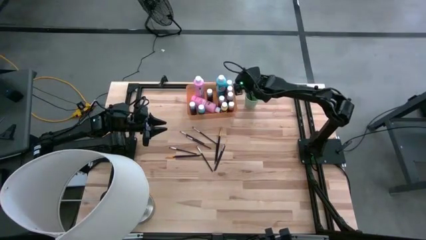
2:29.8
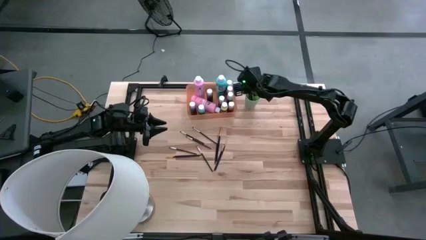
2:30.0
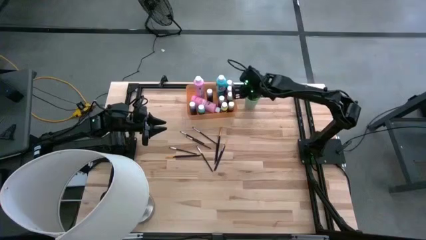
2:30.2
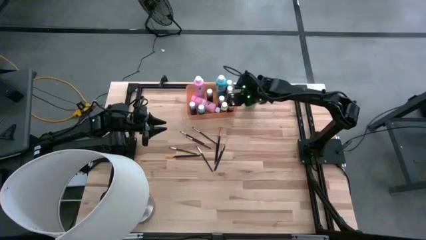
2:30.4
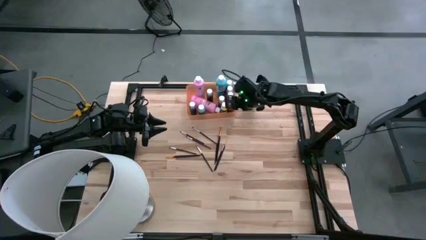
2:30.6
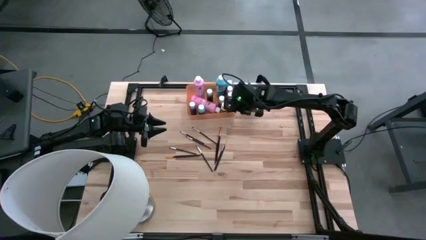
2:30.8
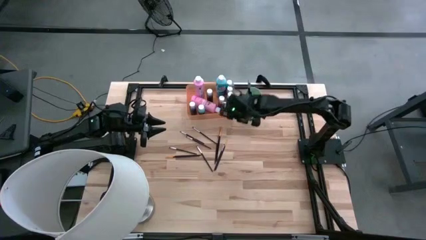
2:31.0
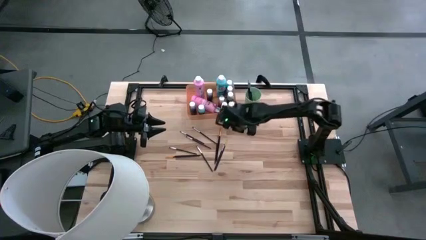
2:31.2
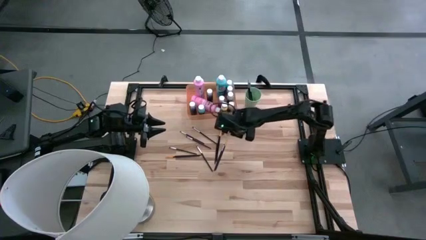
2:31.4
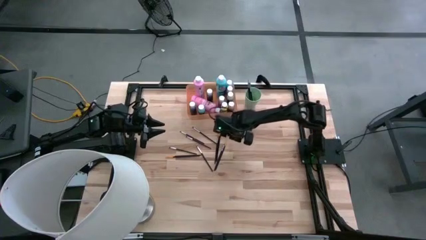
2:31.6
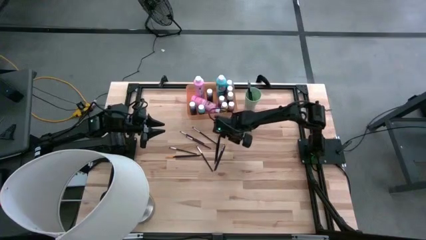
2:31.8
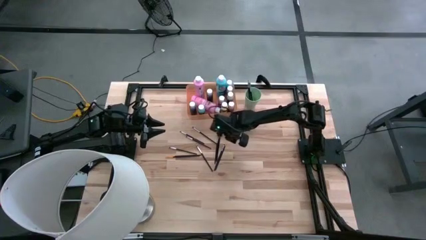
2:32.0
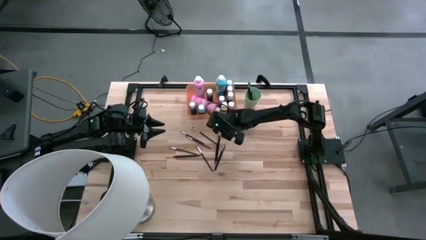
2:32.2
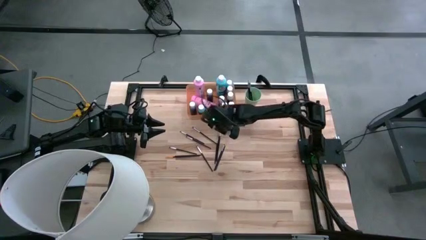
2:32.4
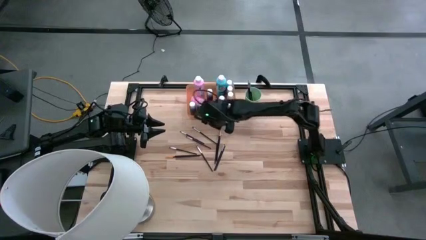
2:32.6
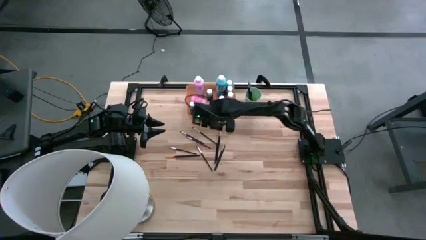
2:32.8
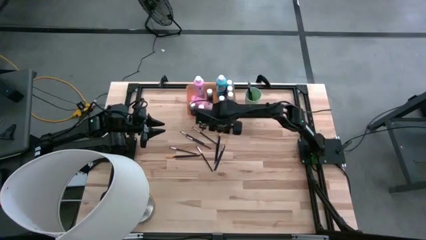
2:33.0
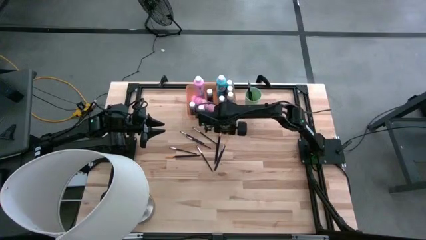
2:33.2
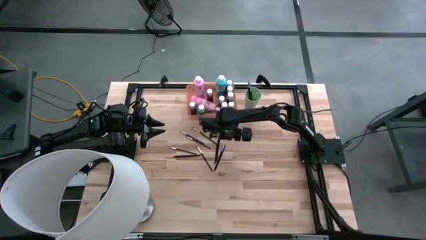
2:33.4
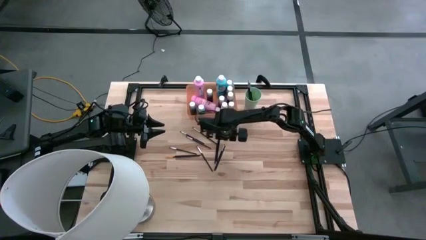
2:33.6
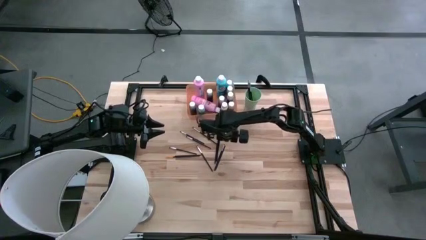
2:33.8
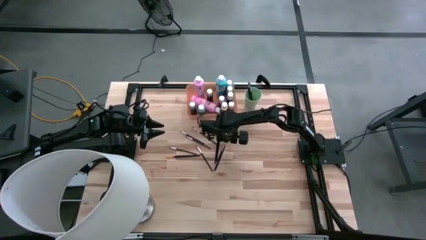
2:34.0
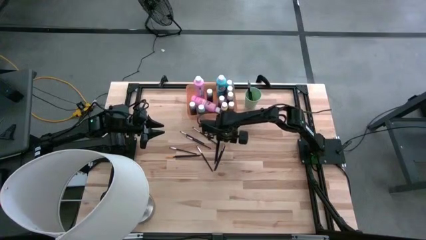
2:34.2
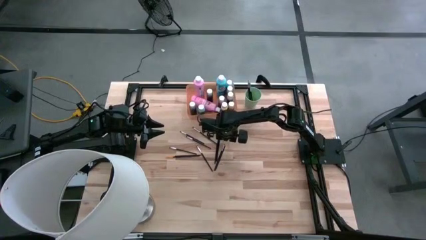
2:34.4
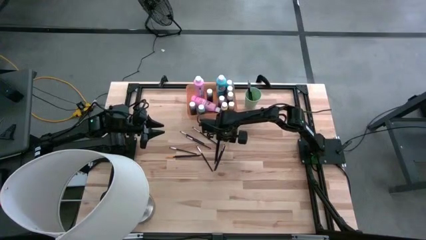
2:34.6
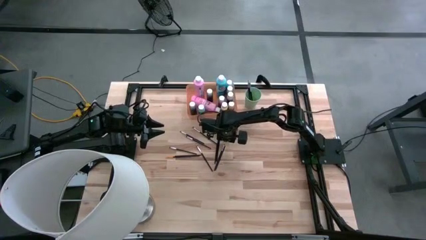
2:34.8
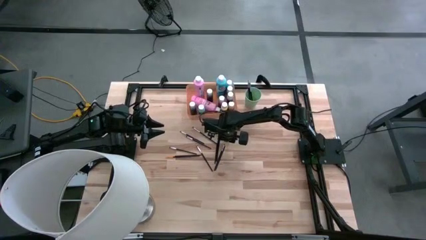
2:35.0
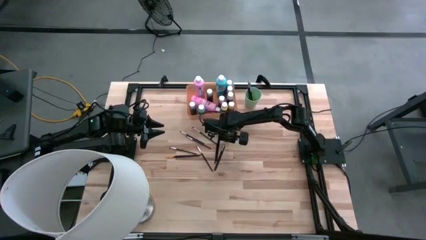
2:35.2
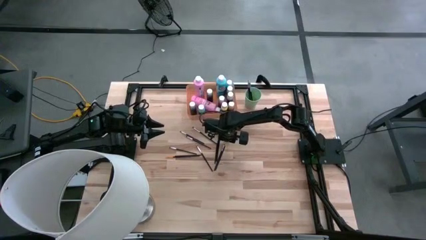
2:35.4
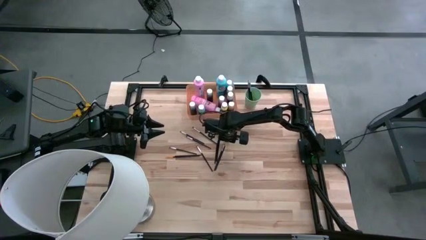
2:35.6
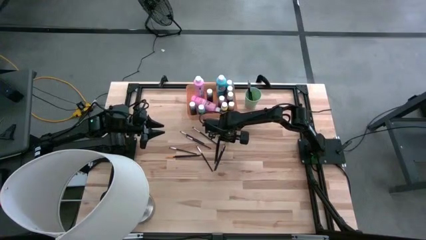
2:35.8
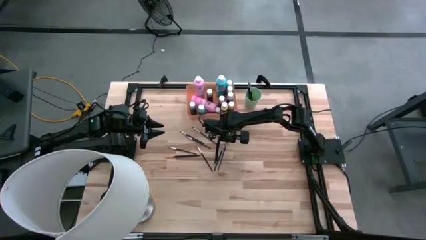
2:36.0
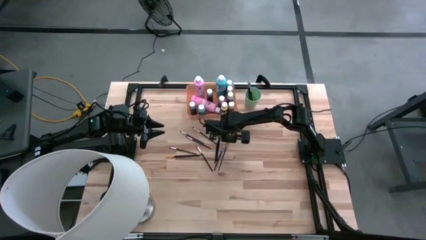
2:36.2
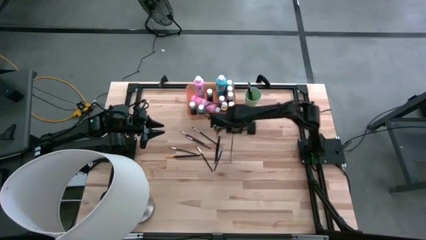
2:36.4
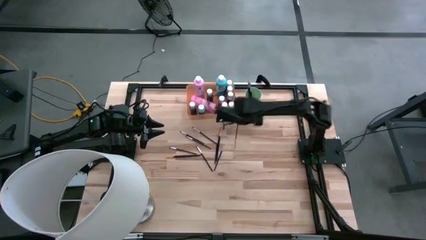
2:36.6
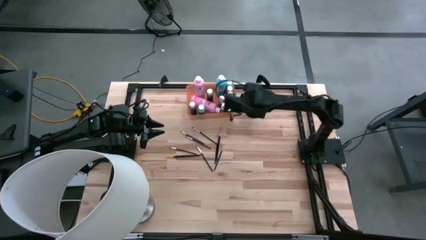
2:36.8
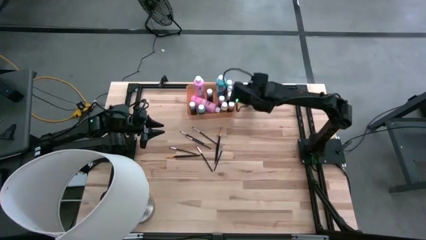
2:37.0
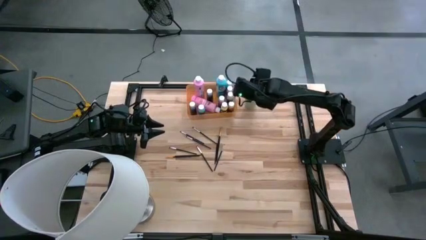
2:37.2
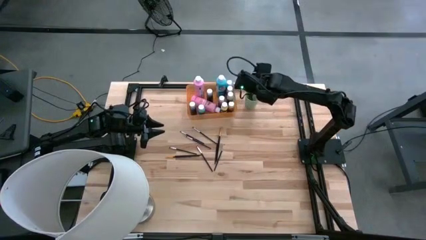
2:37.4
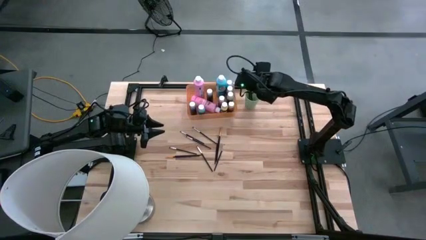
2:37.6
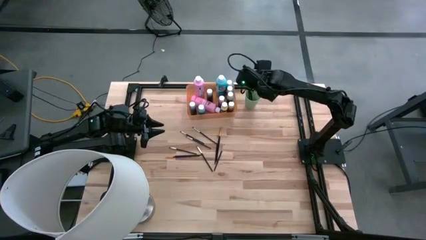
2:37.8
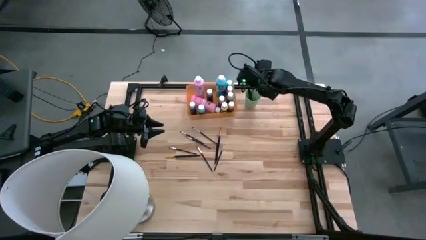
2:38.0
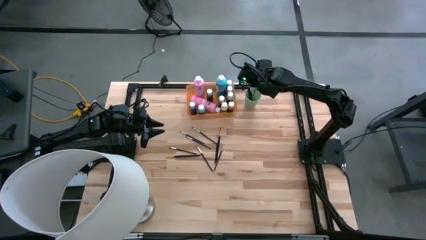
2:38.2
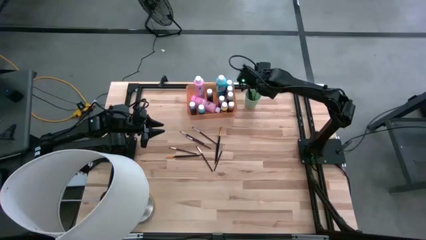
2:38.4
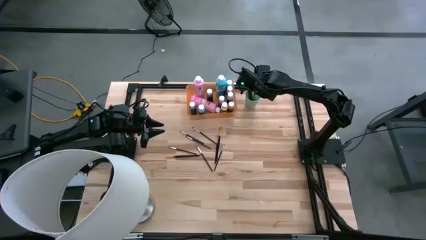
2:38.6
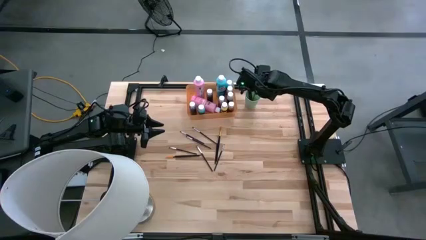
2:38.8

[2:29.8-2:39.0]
Task: Pick & Place Paint Supplies
Put the gold paint brush into the green cup

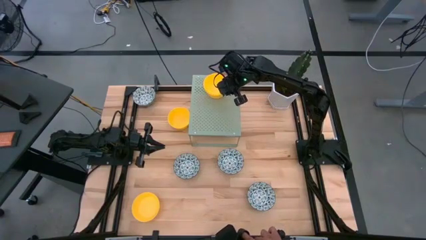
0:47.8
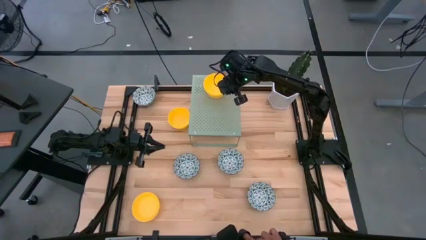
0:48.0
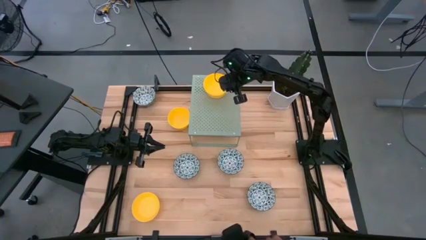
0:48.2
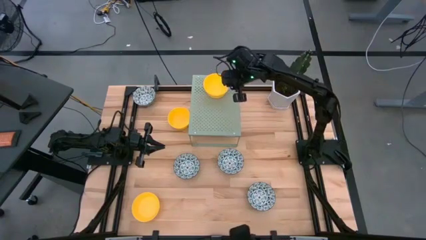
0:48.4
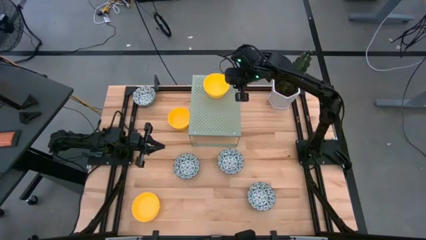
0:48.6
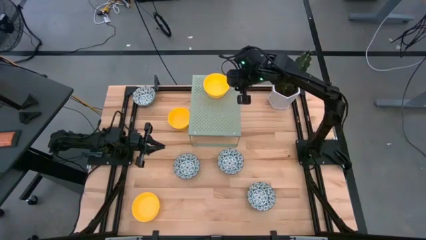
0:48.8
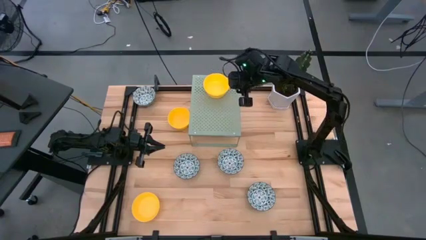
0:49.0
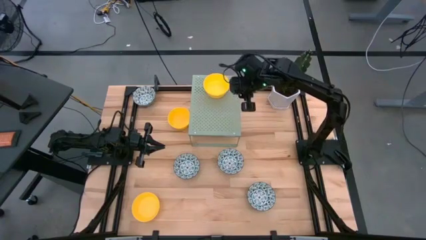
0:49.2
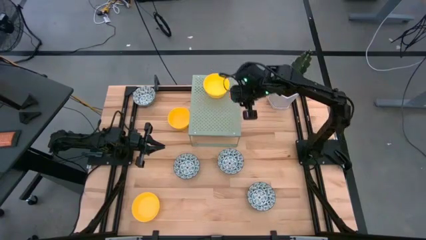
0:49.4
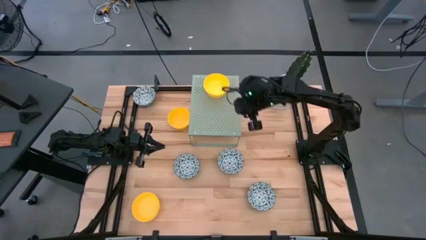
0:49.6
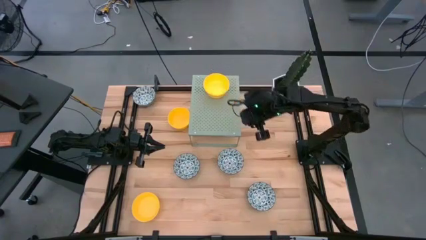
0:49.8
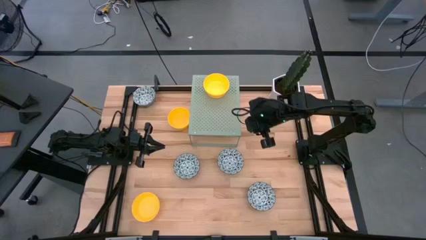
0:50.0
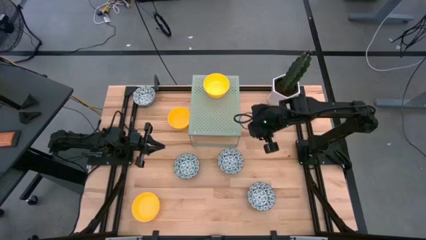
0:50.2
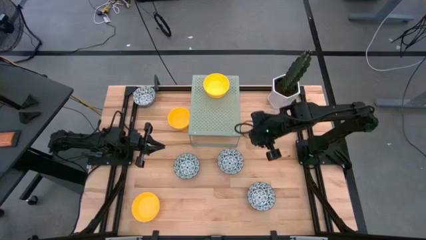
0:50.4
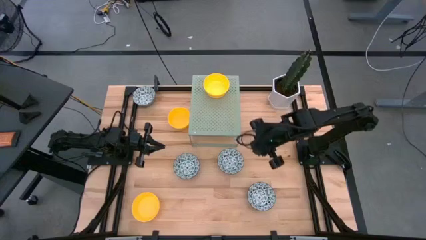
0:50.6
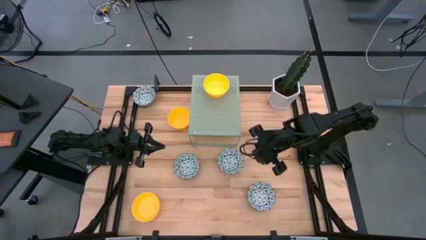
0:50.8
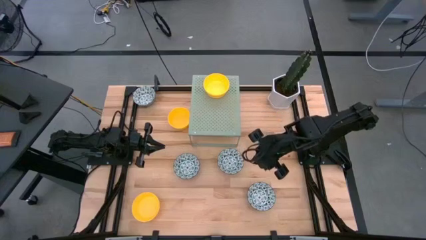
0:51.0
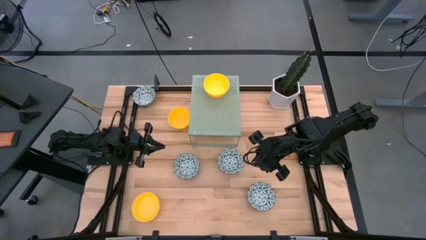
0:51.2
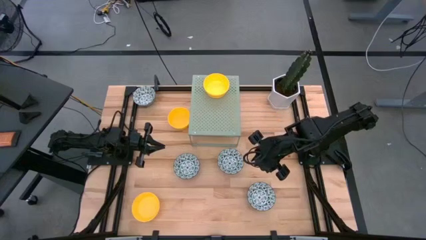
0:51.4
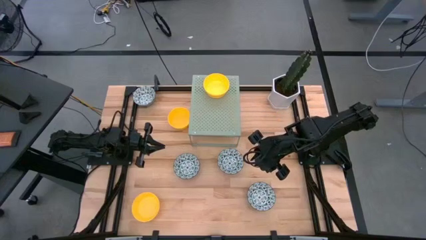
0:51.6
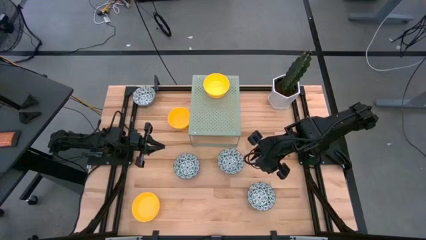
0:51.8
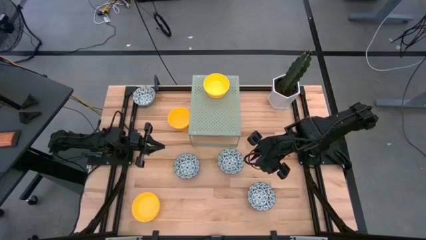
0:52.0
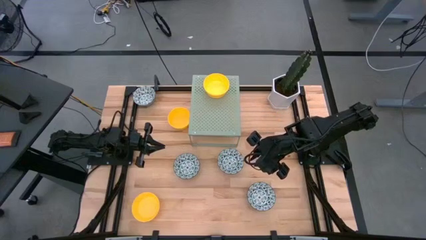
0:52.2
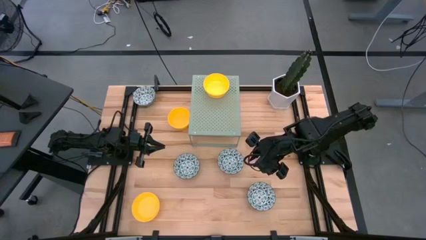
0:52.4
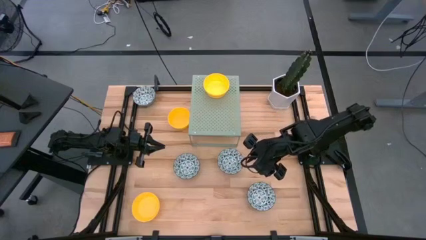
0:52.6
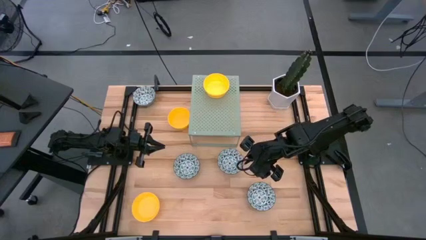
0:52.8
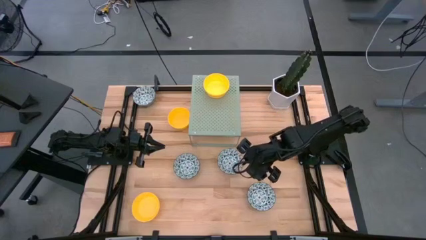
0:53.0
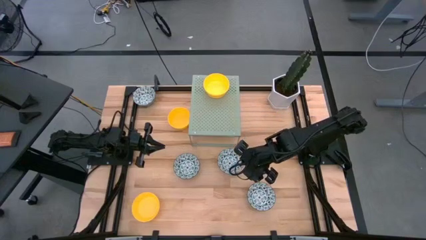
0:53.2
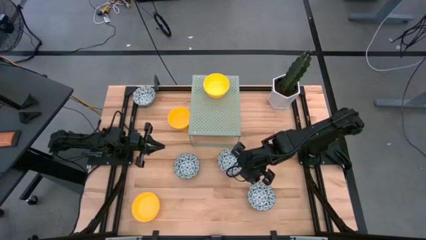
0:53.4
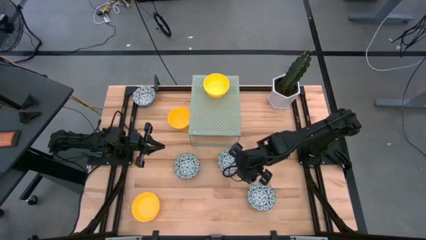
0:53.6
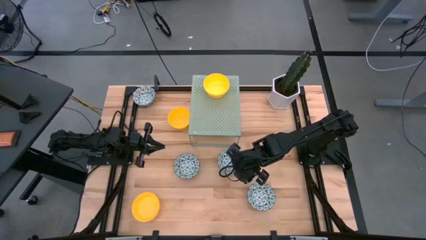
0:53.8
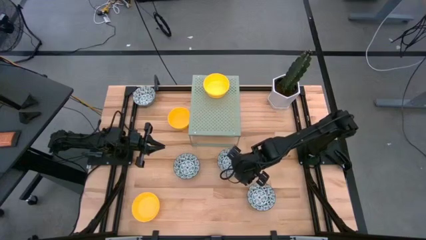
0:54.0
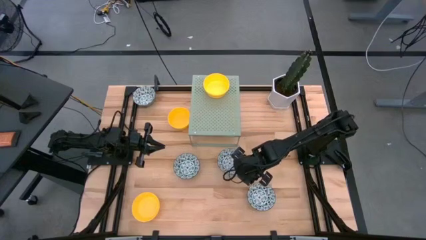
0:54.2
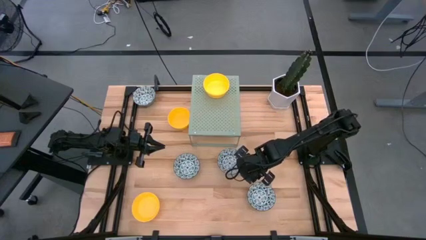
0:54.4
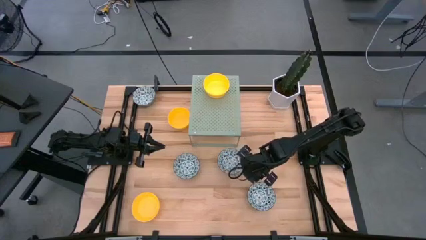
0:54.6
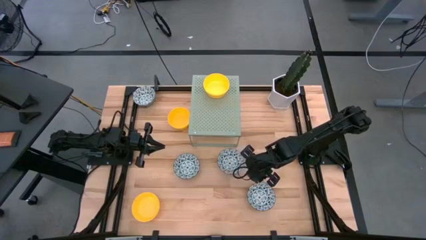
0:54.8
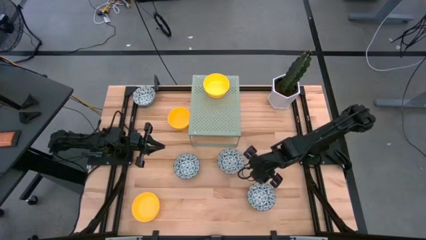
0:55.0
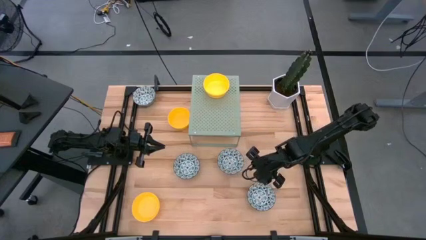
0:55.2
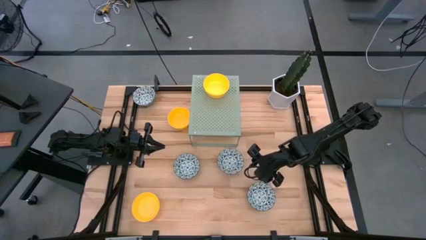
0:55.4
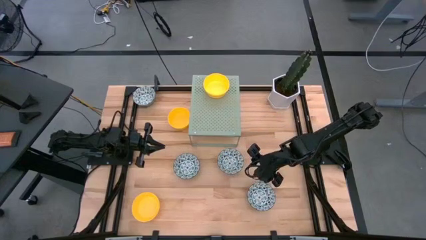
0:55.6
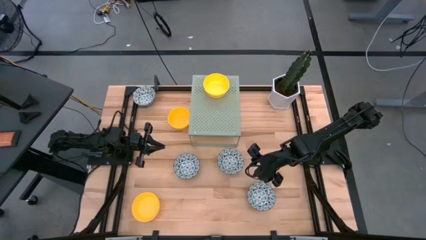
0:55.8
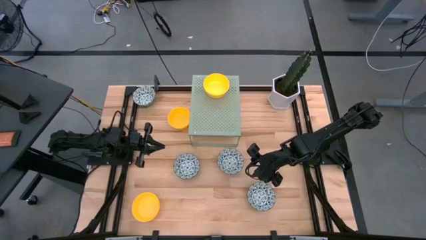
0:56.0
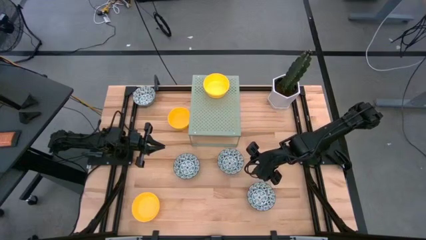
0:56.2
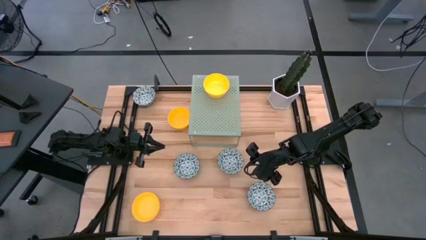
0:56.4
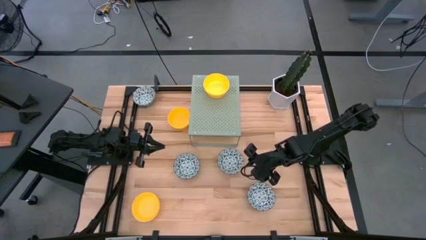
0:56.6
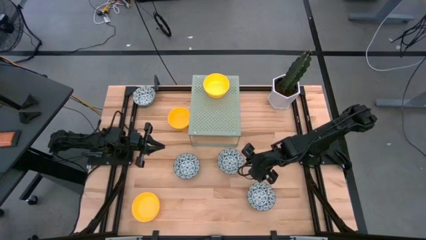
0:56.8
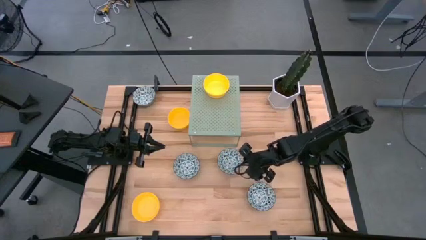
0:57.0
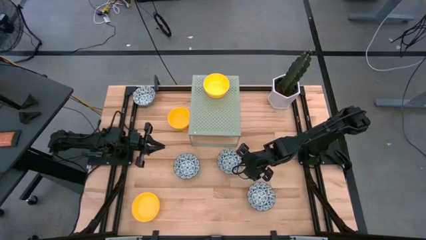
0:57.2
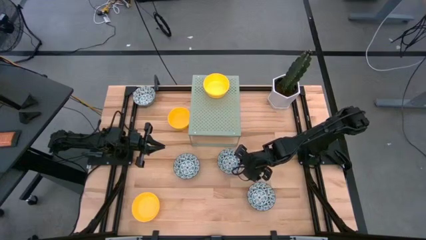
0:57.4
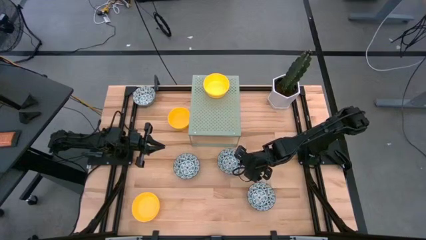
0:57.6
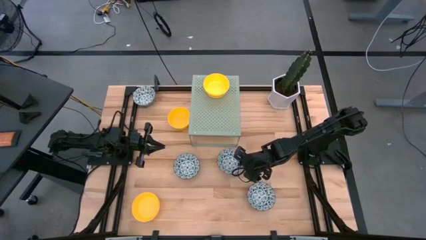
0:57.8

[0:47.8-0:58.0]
Task: Pick & Place Mini bowls
Put the blue and white bowl on the shelf
